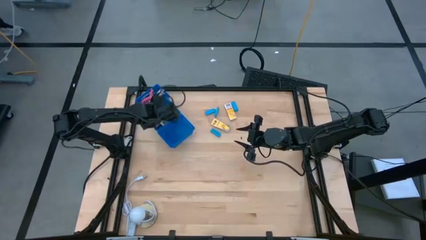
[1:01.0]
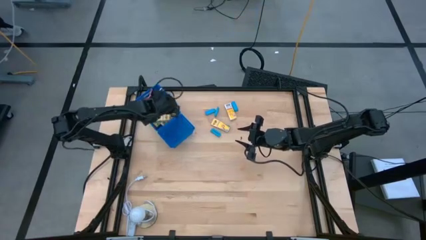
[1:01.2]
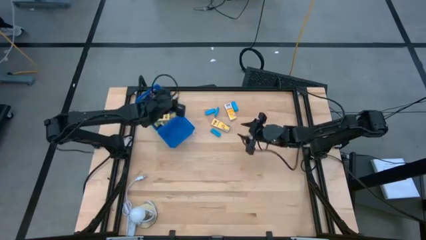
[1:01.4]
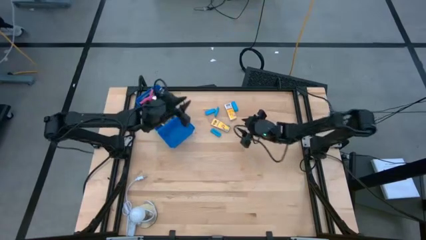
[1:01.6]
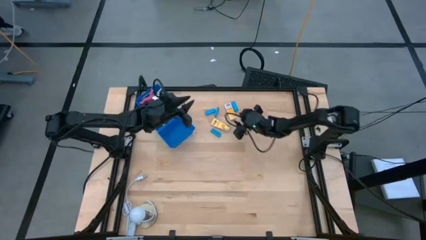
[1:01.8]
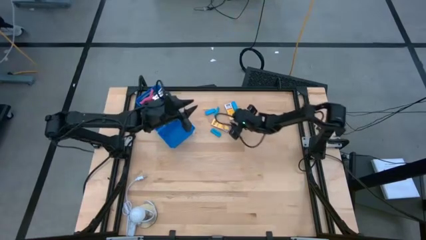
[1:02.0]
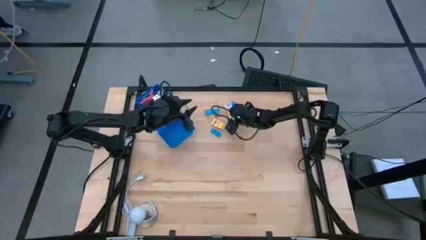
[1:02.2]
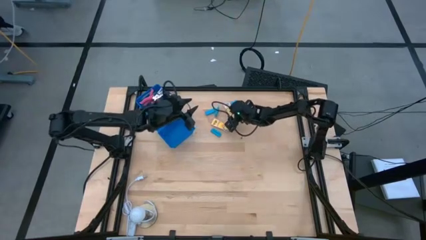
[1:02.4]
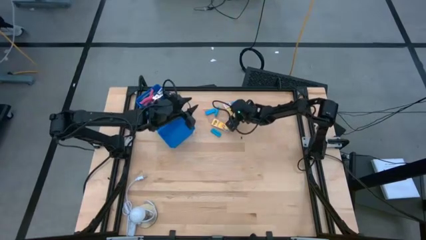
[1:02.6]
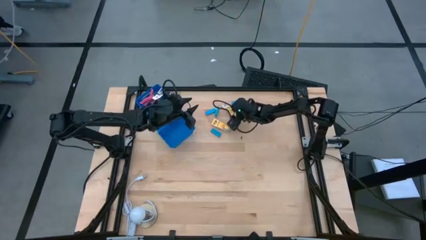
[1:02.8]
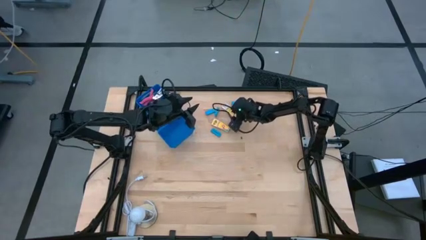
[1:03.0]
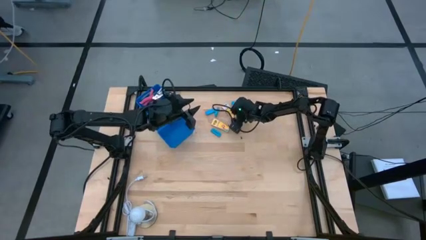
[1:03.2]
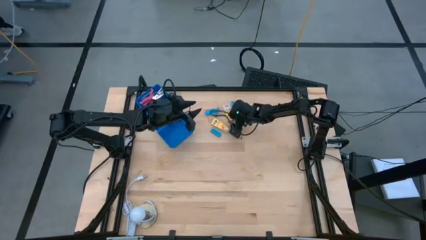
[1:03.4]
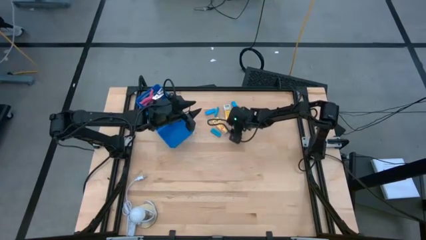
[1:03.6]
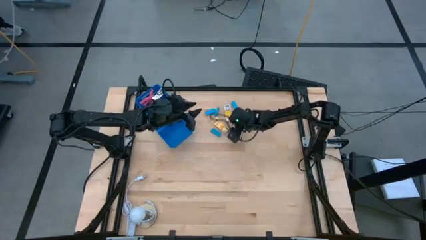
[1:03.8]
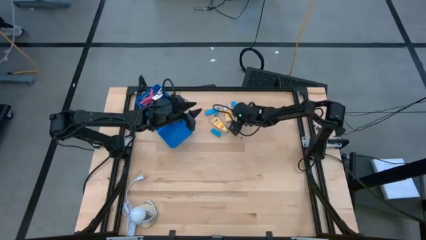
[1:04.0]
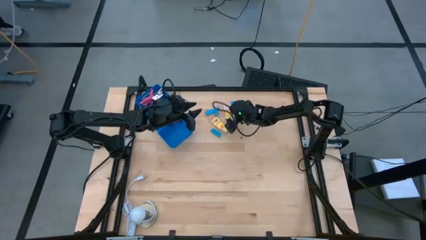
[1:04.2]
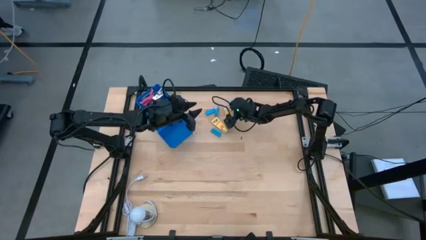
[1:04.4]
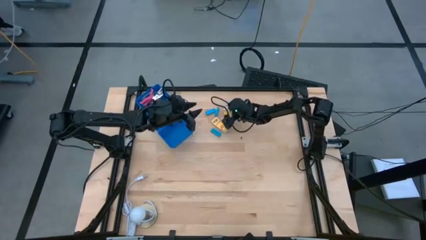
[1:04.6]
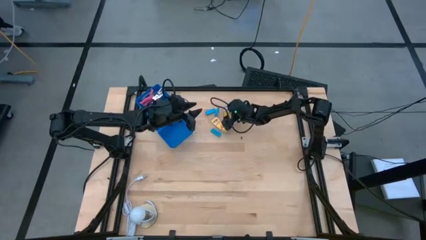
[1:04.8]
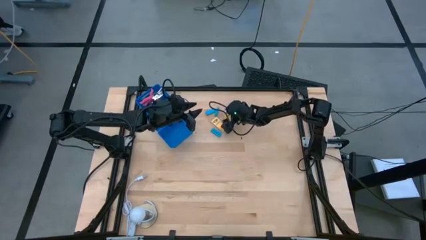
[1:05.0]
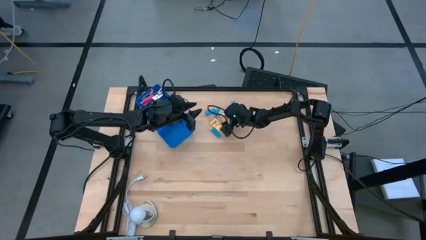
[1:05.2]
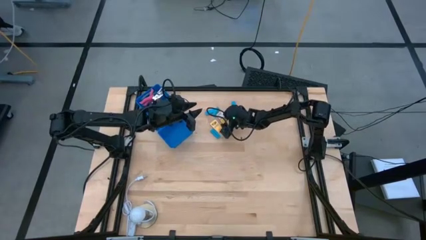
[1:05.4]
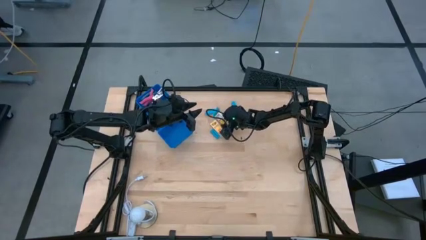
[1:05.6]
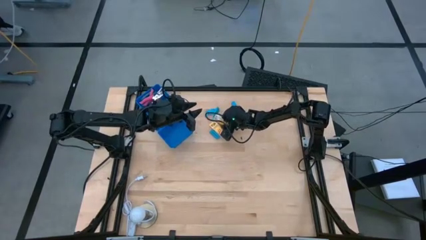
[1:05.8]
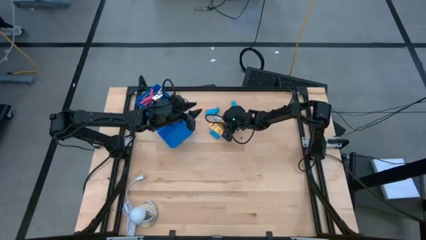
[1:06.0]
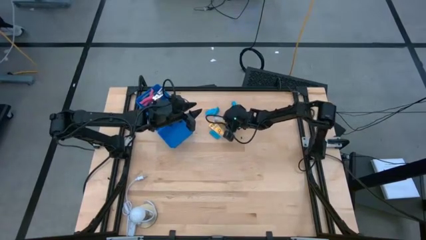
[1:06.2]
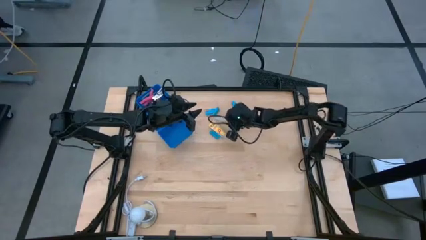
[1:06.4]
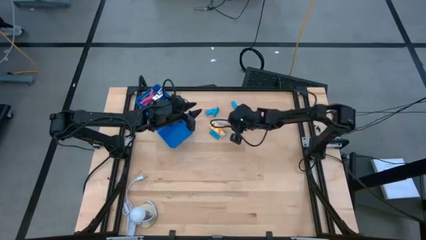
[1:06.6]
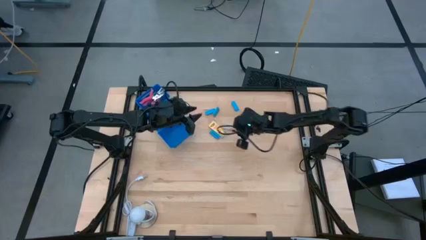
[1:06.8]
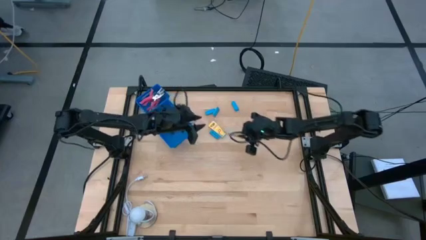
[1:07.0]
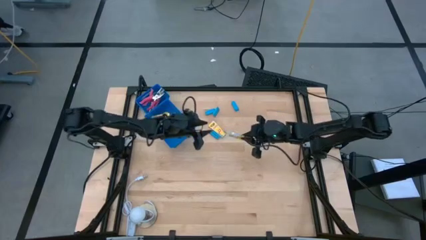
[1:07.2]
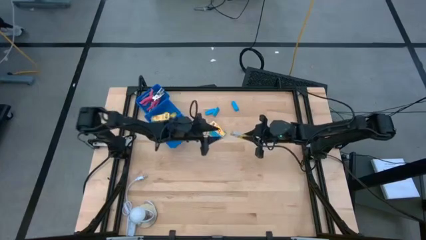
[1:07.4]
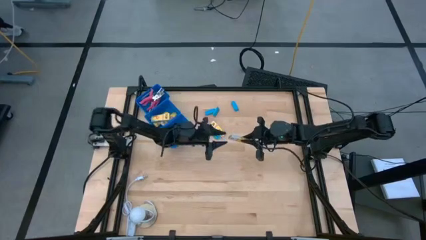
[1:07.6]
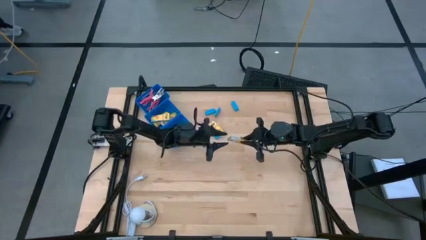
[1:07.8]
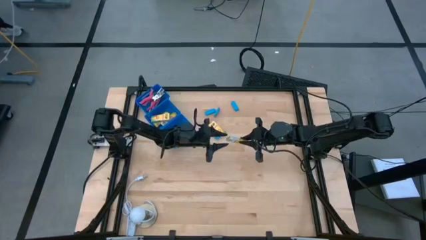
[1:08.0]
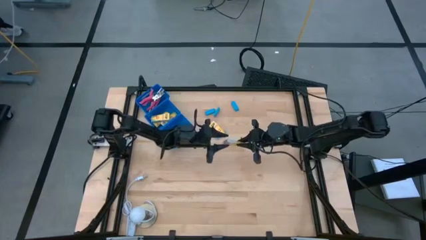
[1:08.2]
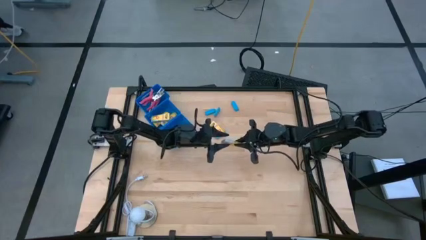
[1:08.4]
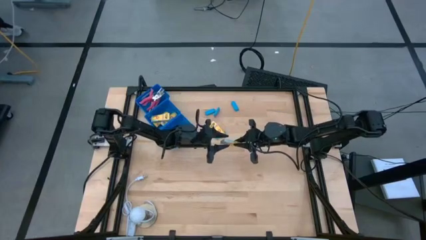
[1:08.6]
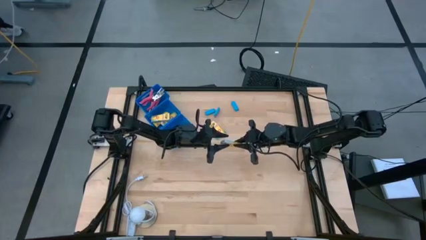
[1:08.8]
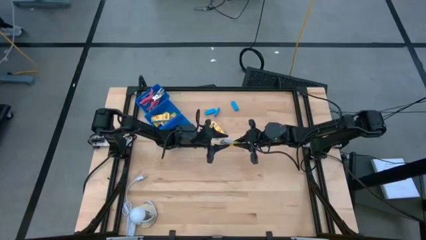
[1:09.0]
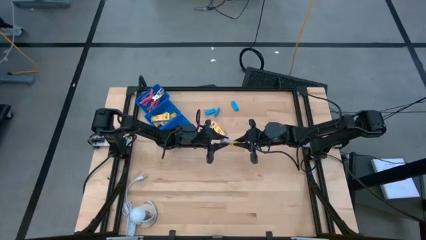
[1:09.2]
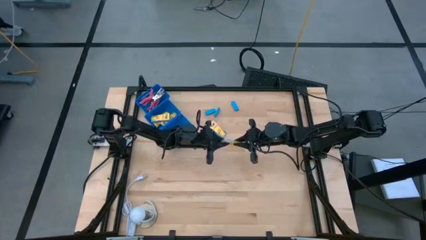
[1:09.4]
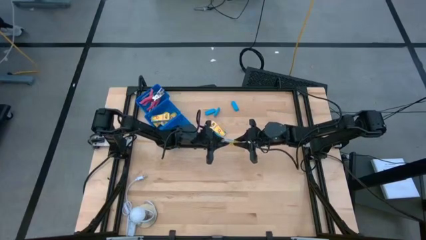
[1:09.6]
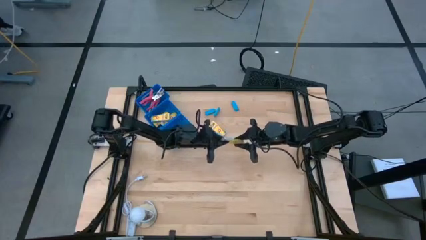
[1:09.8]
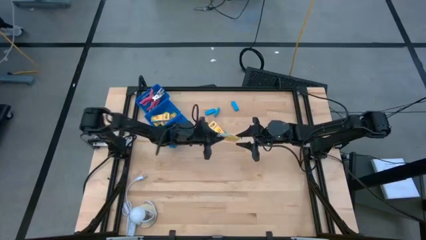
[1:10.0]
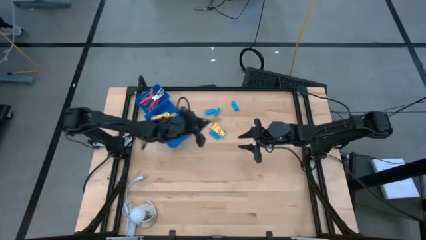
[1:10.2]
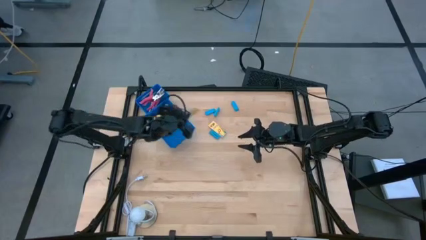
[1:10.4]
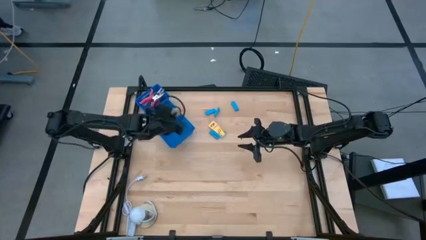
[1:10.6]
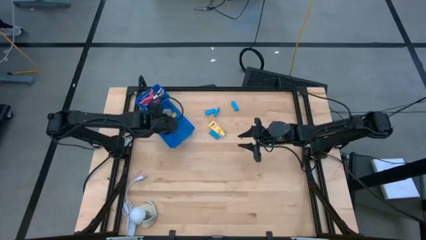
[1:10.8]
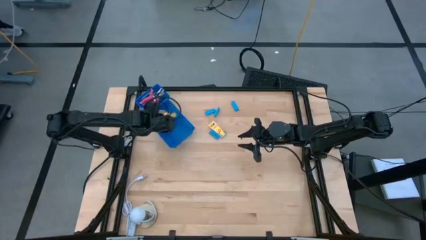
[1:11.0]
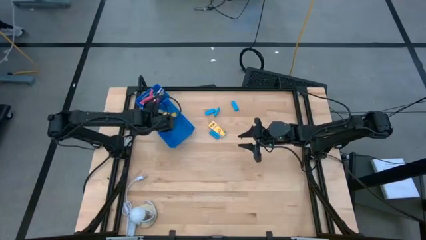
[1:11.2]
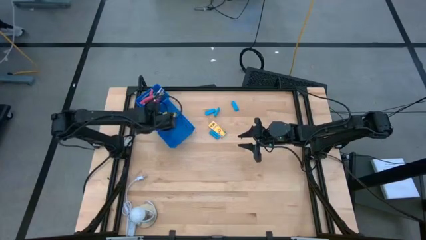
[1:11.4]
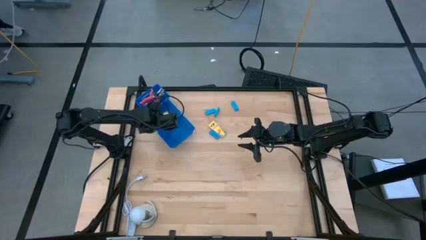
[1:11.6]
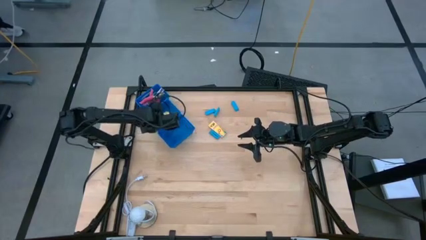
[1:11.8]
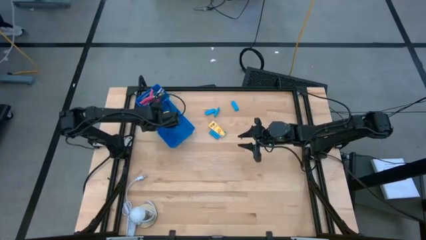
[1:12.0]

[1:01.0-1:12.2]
Task: Pick & Place School Supplies
Put the yellow crayon box into the middle blue bin

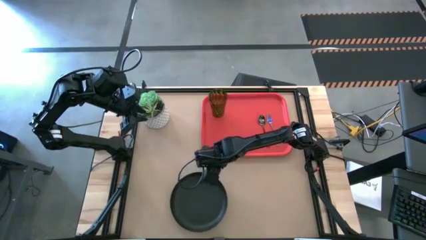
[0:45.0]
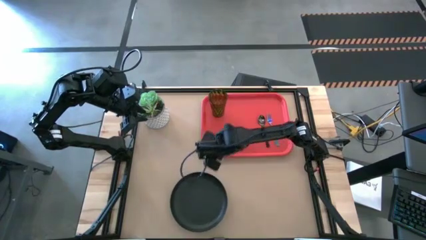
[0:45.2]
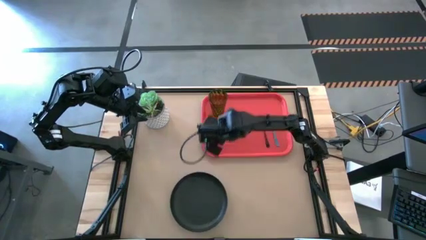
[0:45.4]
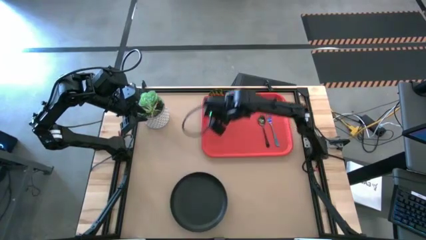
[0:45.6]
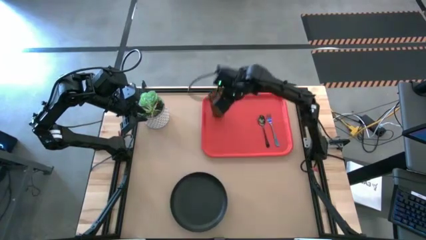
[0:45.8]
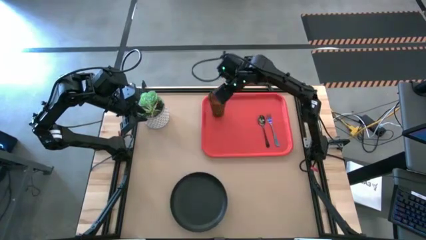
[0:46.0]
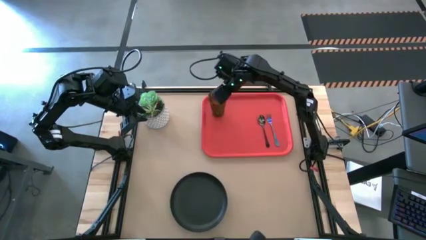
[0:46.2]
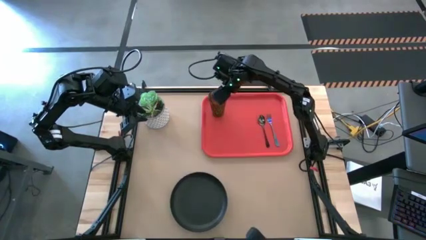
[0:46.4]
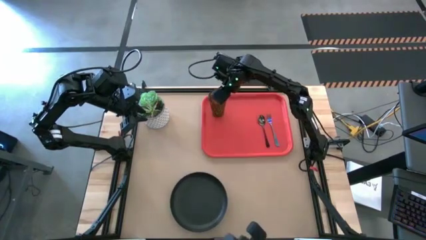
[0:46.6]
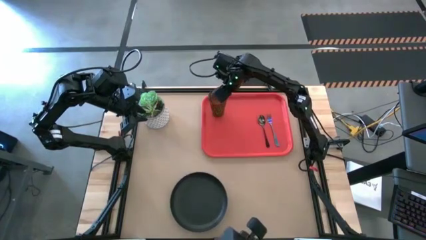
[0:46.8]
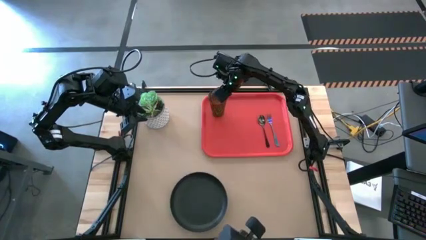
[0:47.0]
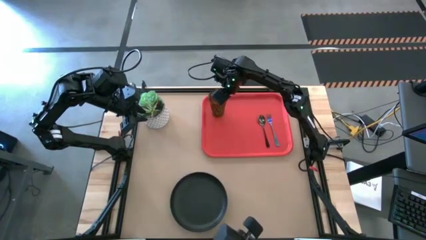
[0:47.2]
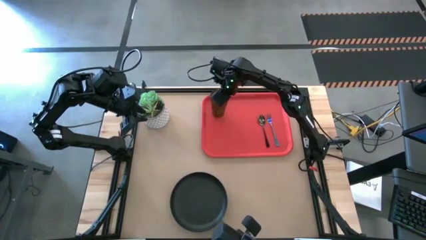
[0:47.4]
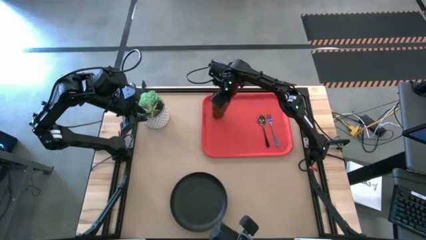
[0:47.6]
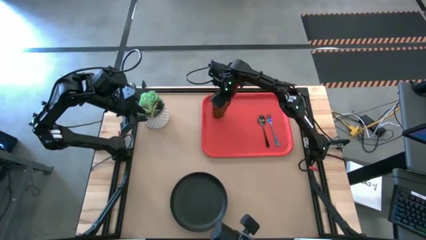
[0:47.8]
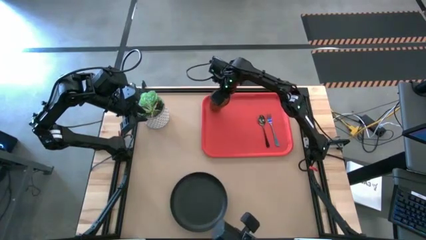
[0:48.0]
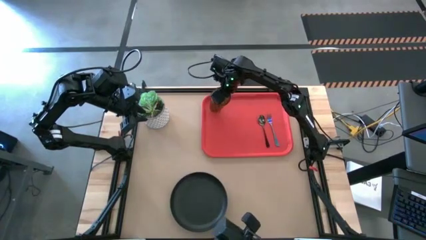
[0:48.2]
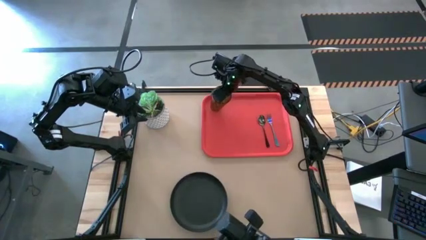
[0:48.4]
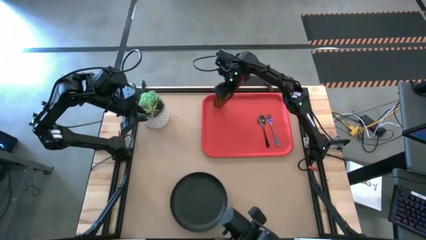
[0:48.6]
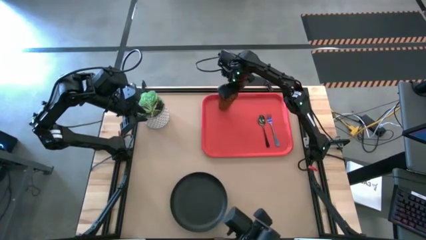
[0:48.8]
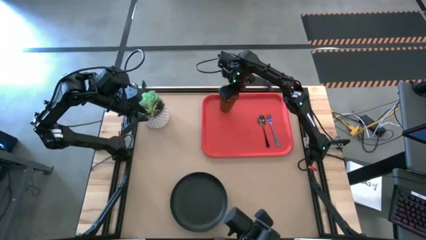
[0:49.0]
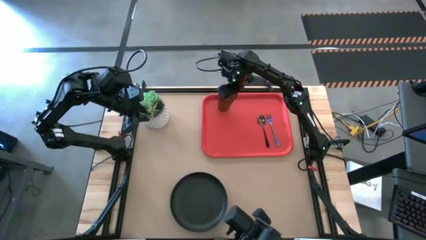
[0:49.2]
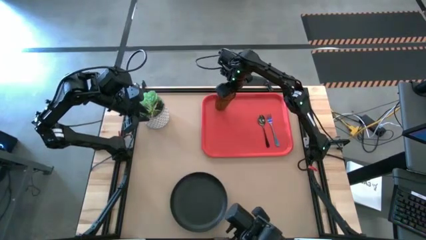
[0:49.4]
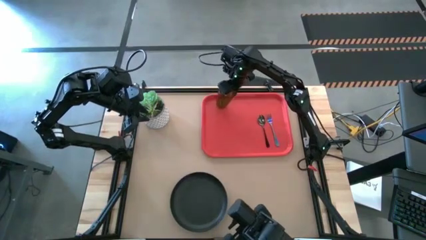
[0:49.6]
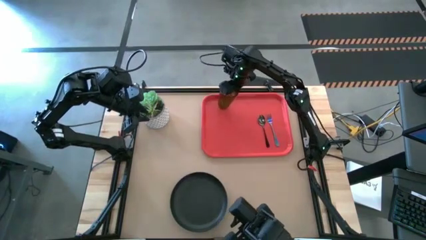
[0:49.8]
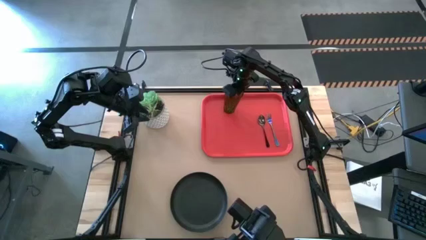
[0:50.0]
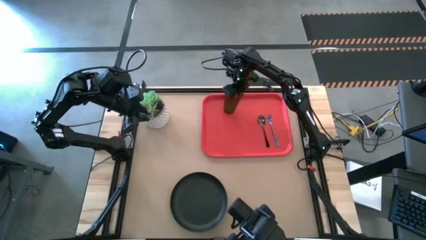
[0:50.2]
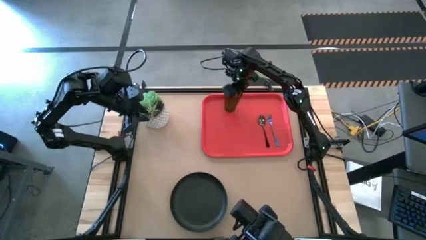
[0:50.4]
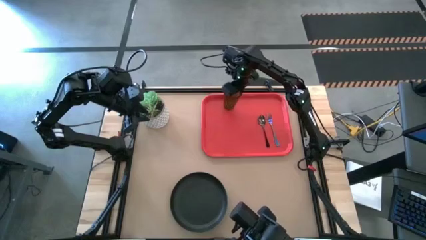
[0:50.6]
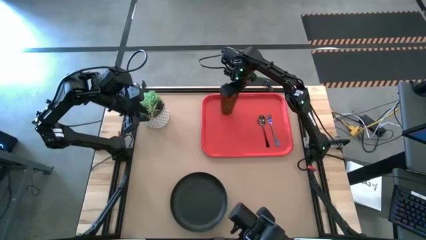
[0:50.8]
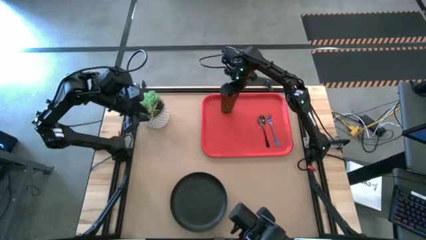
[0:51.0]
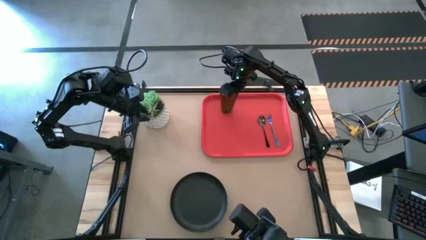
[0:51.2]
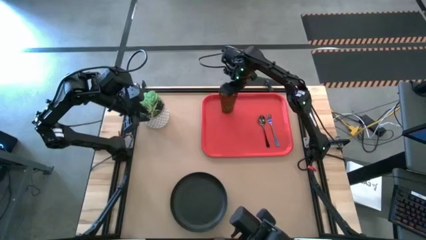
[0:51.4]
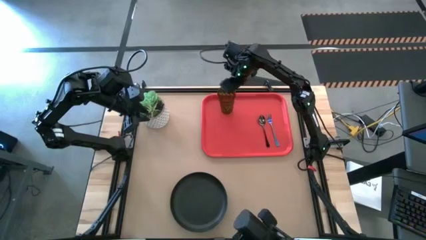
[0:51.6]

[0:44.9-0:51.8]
Task: Pick and place plate/cup/fork/spoon on tray
Adjust the green cup on the red tray
